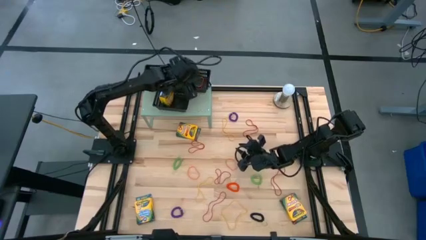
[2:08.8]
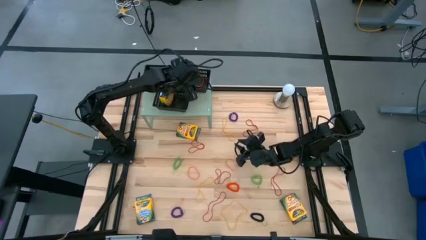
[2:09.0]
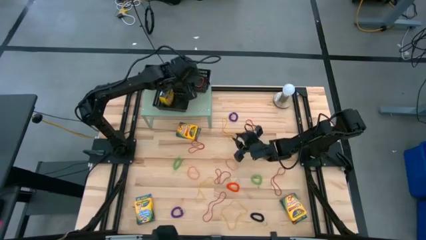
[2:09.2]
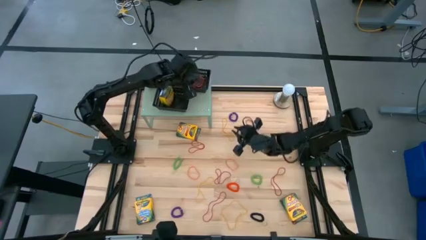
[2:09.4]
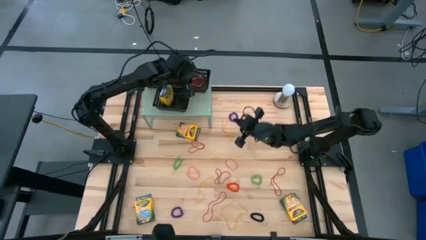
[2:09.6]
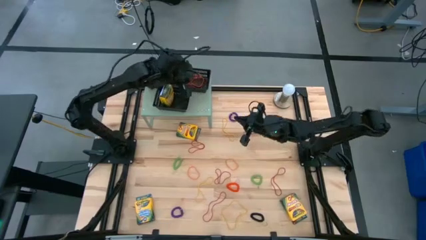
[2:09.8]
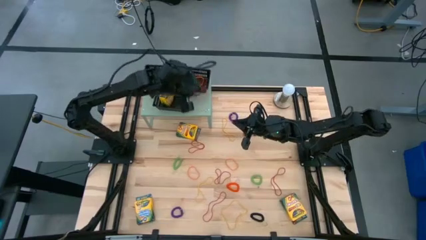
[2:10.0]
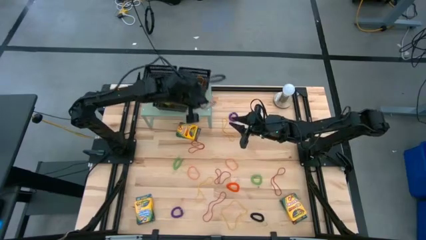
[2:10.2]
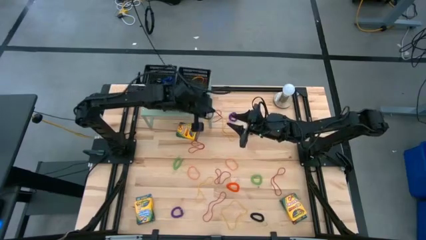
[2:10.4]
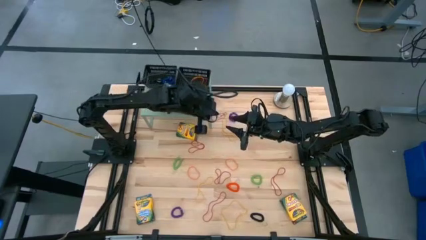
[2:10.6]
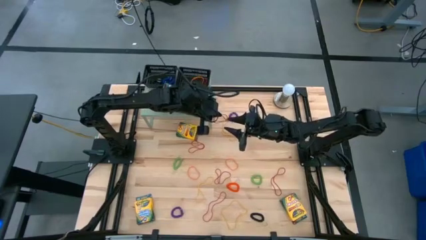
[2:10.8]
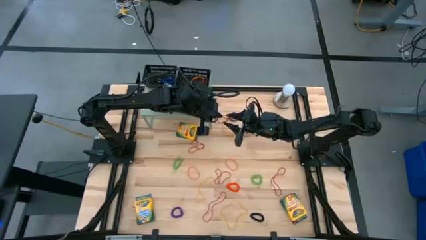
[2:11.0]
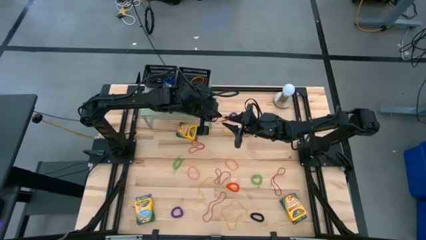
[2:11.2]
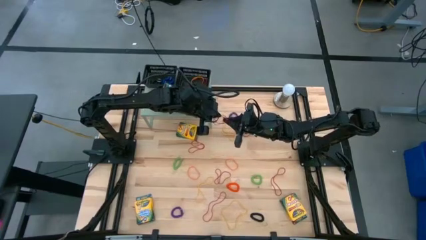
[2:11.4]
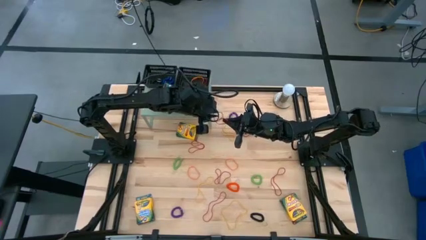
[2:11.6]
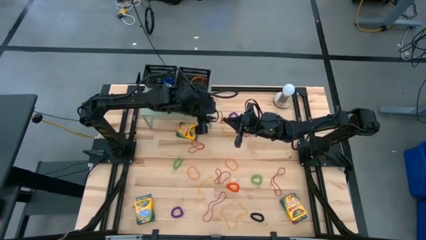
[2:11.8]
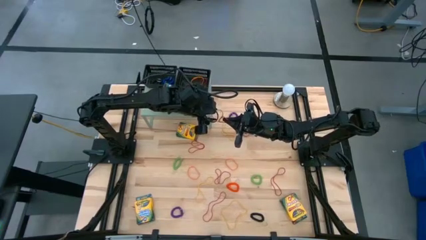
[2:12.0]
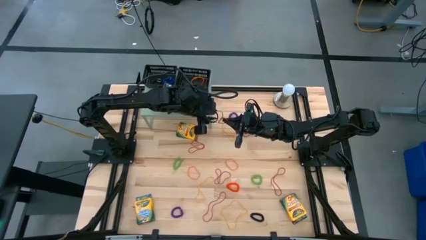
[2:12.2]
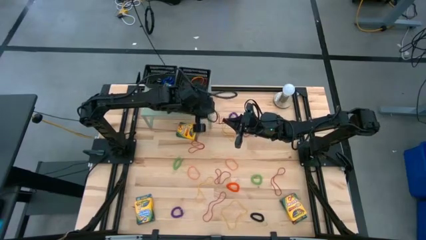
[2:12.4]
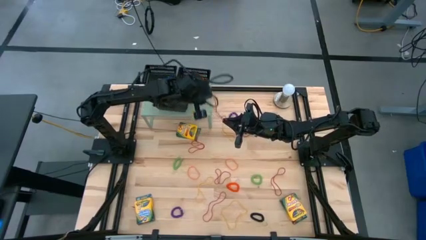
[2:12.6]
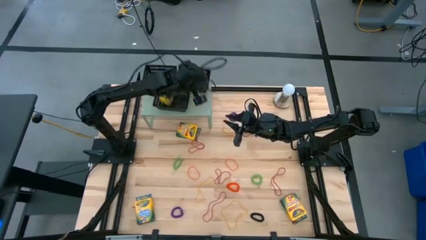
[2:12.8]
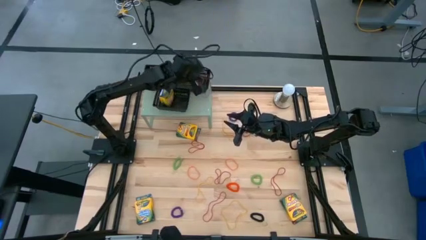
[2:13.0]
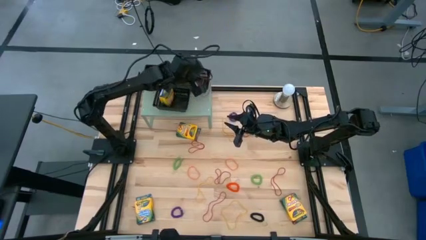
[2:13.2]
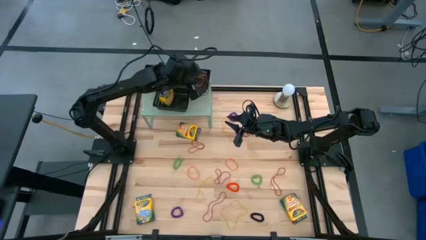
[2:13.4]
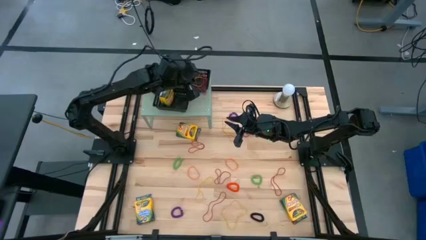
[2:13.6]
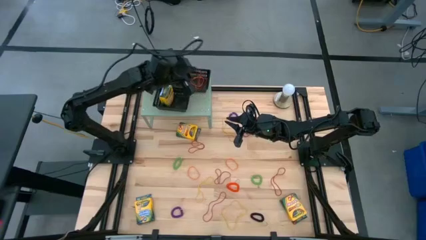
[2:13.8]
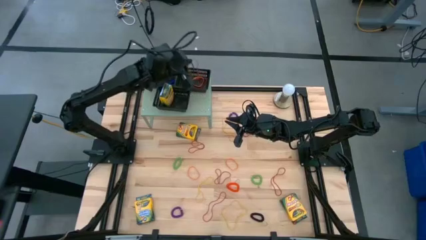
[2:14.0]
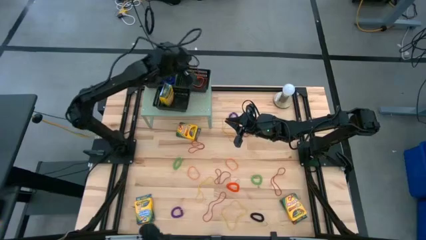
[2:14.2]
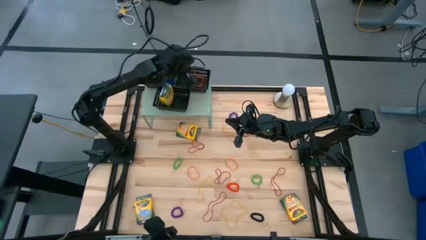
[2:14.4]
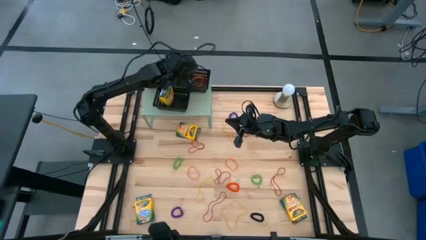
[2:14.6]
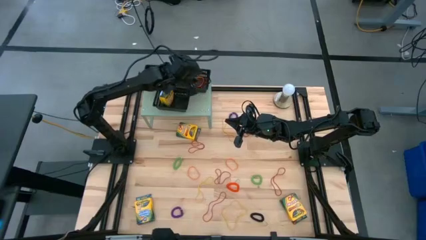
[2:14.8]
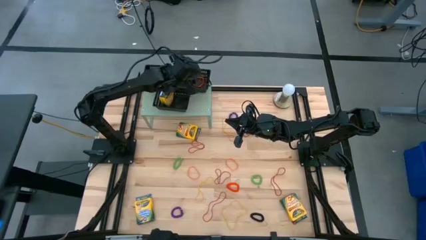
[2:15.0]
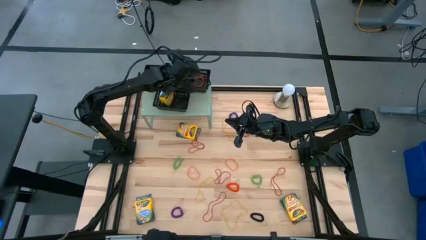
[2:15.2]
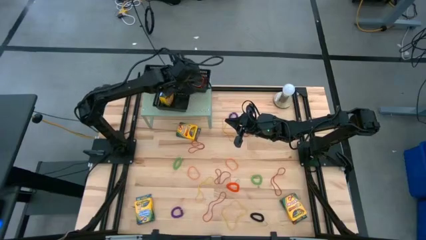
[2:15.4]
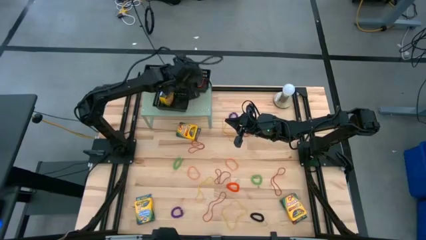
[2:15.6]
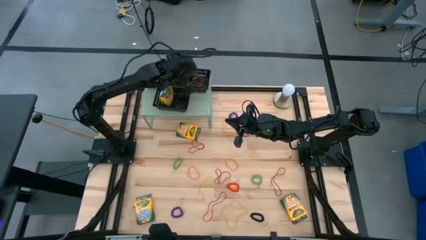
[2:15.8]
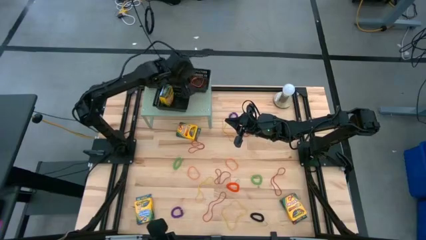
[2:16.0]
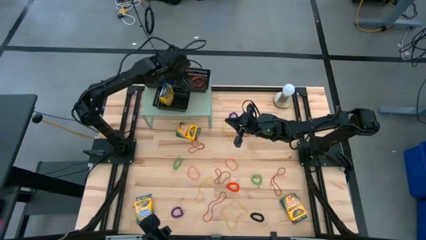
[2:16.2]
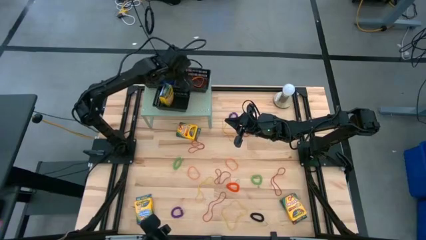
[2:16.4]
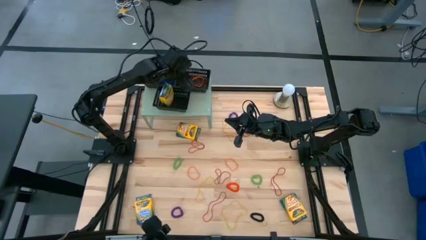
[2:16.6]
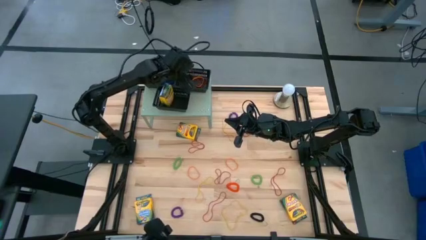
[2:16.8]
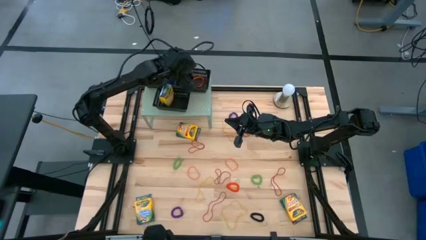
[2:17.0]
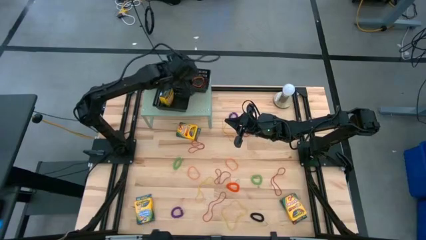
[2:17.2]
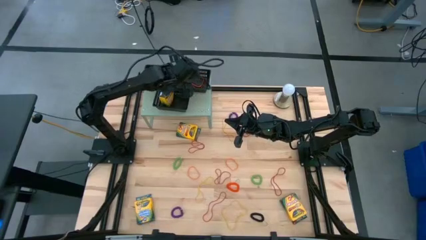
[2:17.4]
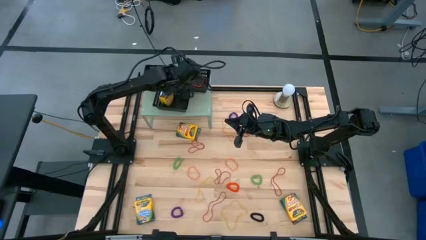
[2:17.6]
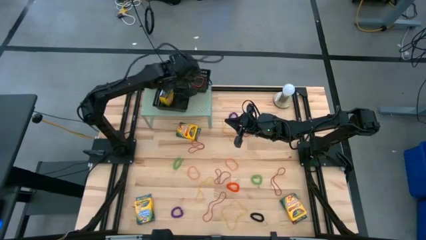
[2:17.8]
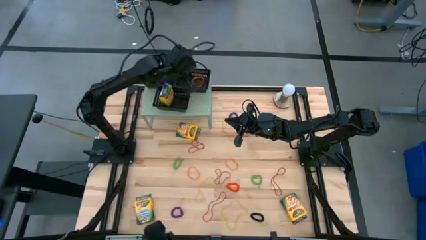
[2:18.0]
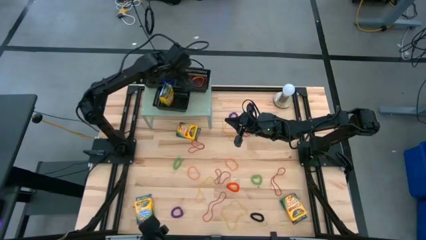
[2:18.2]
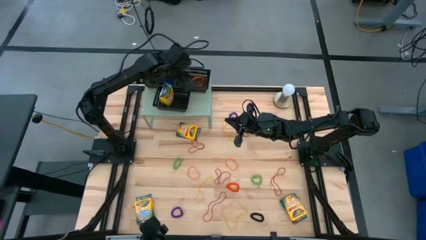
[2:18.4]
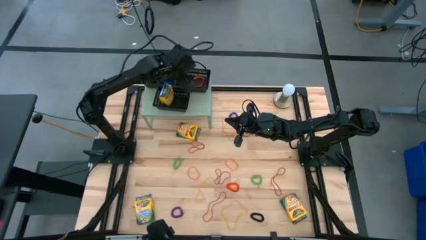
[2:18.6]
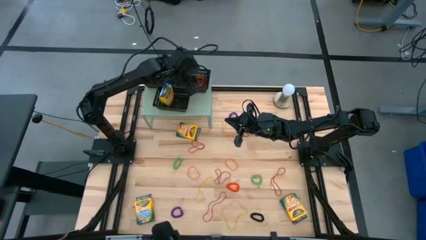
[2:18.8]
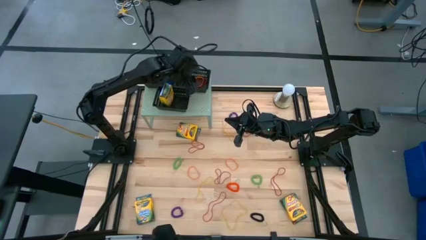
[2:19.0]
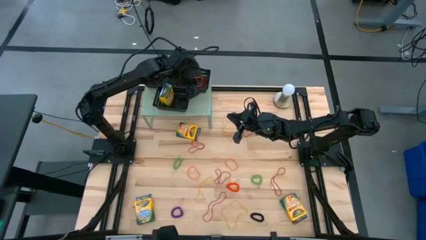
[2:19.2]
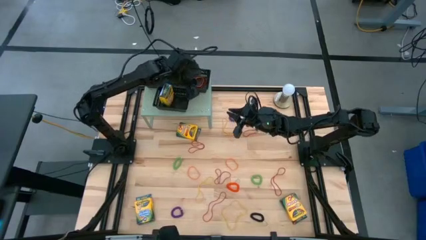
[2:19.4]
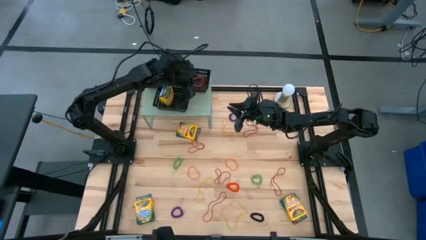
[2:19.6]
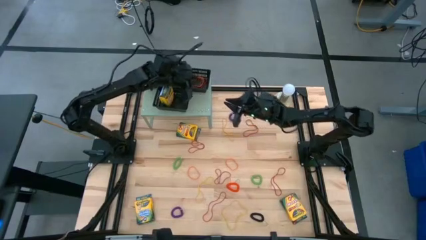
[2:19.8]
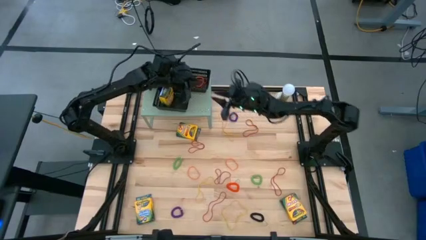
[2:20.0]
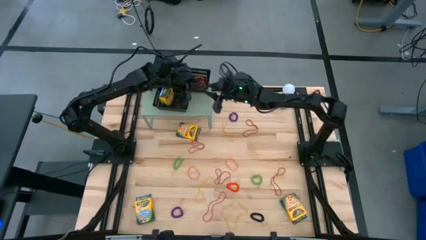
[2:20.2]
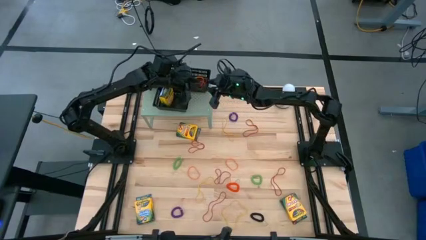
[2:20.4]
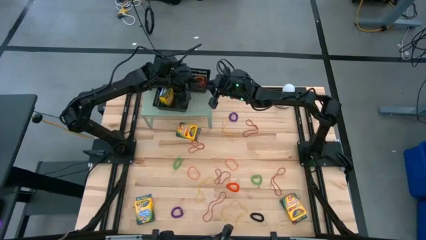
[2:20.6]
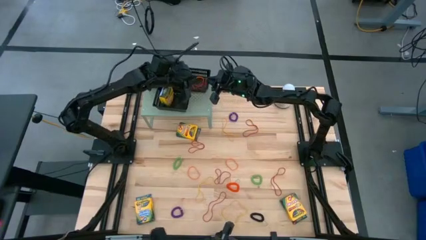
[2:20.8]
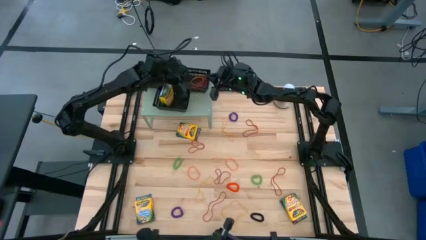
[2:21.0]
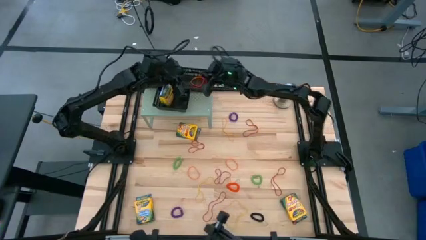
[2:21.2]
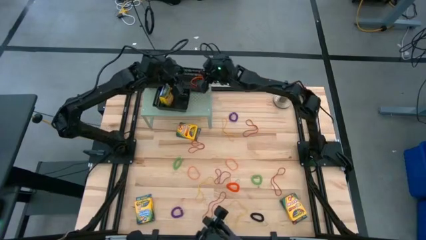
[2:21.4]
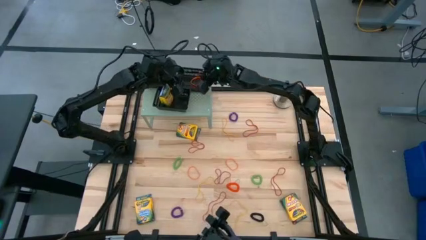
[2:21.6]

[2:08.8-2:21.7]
Task: Pick & Place Office Desk Supplies
Put the red rubber band into the top right black bin

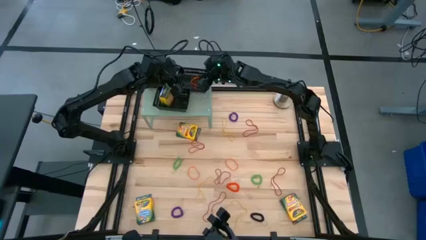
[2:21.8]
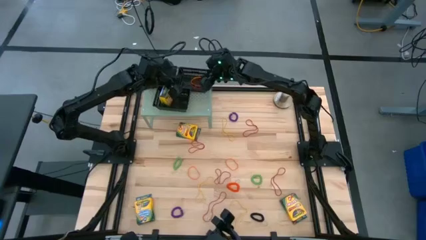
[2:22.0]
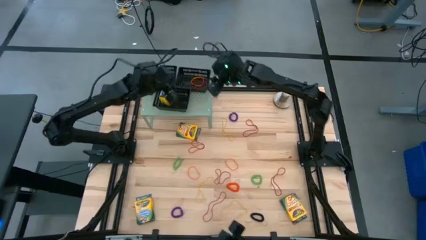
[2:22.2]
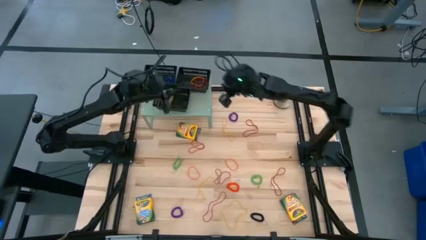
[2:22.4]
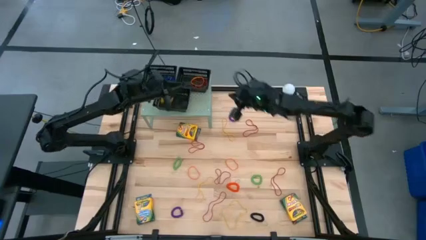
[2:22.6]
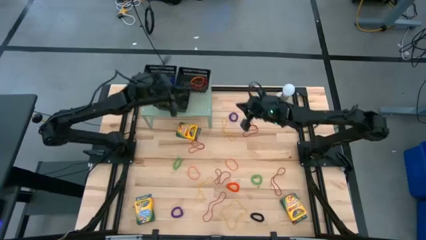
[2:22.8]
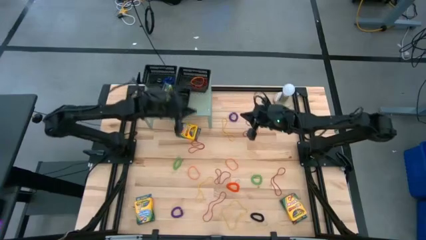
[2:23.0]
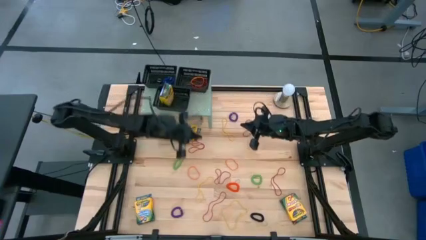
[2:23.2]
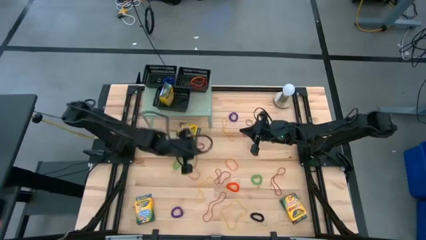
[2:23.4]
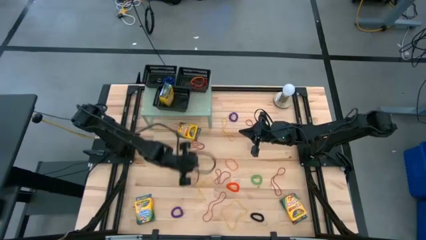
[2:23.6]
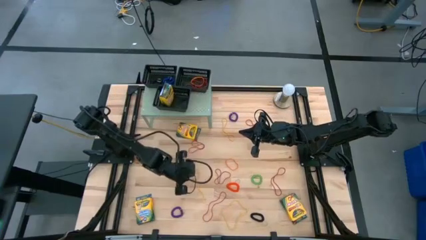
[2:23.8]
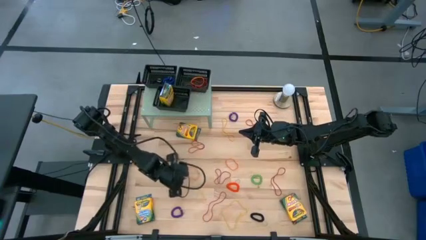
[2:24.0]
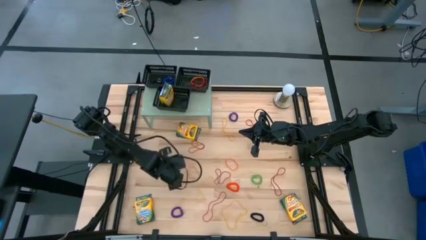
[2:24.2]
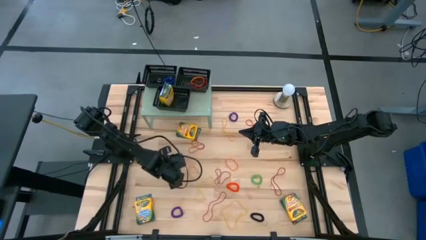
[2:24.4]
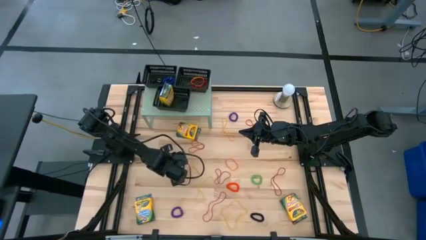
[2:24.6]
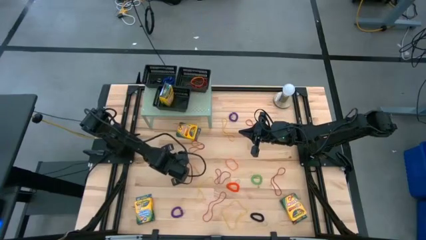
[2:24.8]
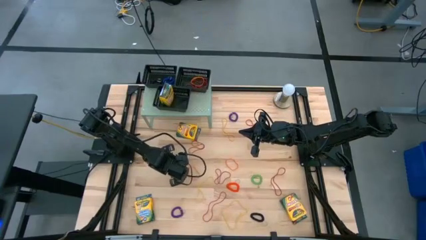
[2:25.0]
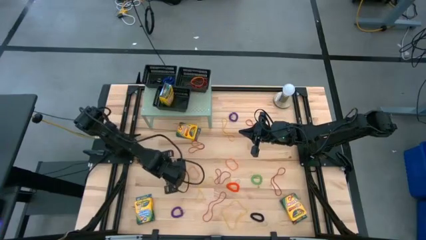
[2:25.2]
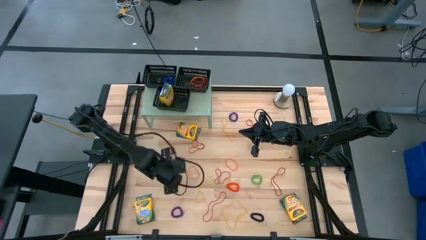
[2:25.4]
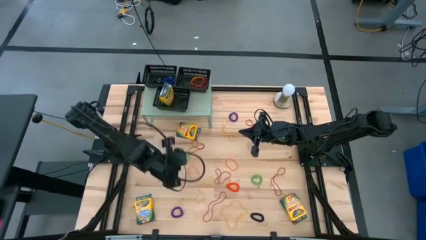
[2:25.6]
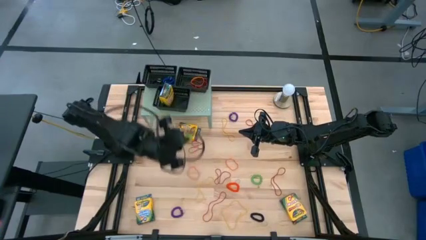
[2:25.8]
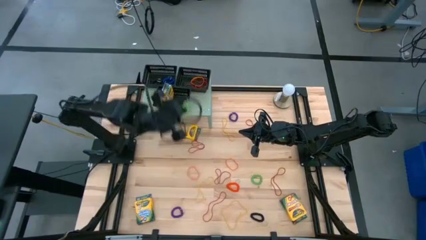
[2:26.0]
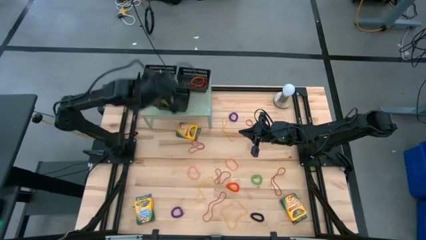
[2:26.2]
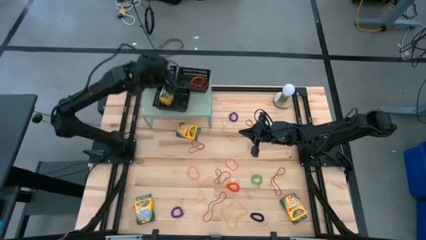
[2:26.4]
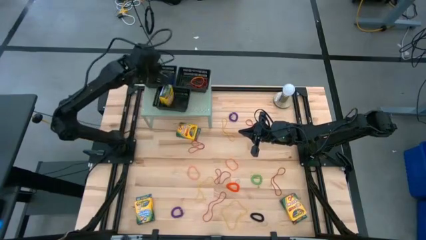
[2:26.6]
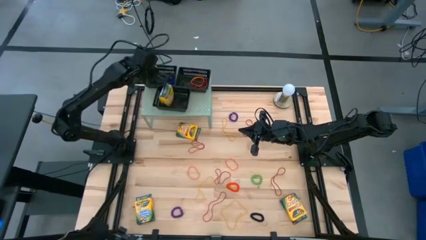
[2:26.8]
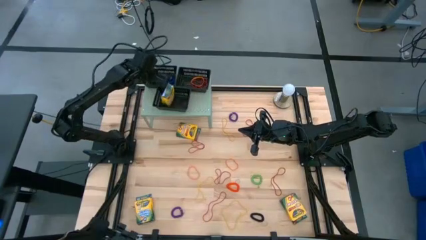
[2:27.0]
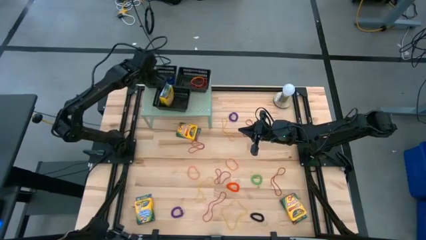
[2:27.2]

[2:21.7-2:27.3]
Put the green spring rubberband into the top left black bin
